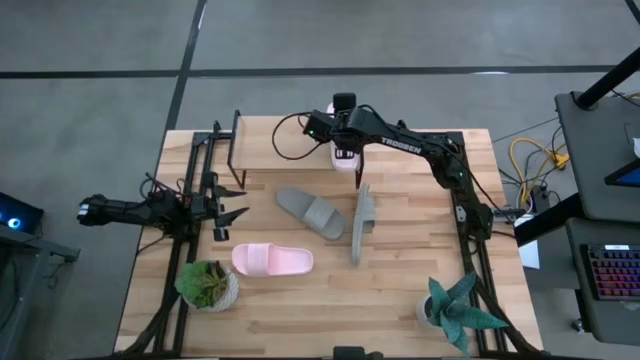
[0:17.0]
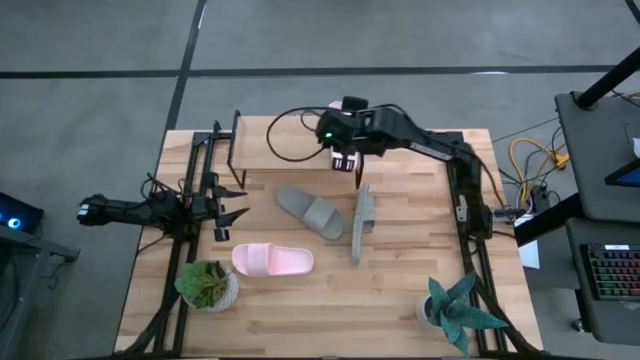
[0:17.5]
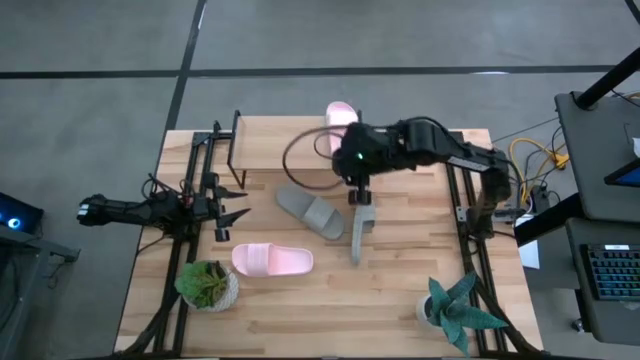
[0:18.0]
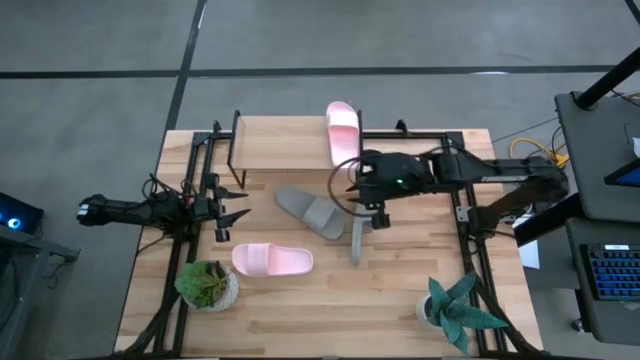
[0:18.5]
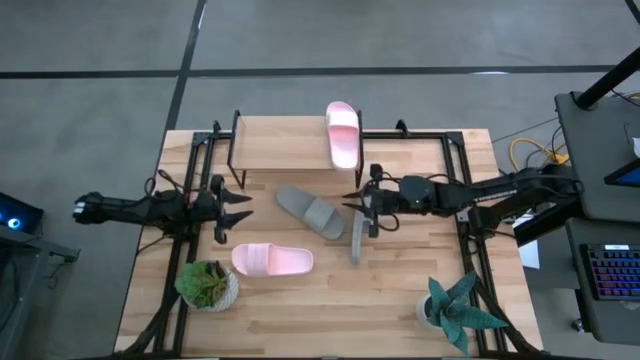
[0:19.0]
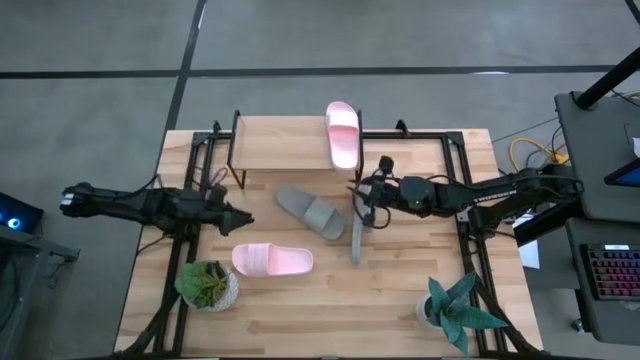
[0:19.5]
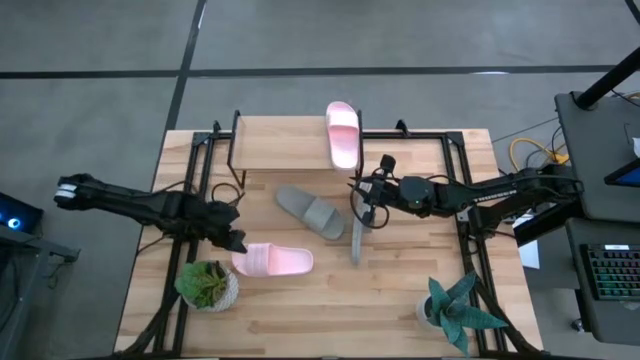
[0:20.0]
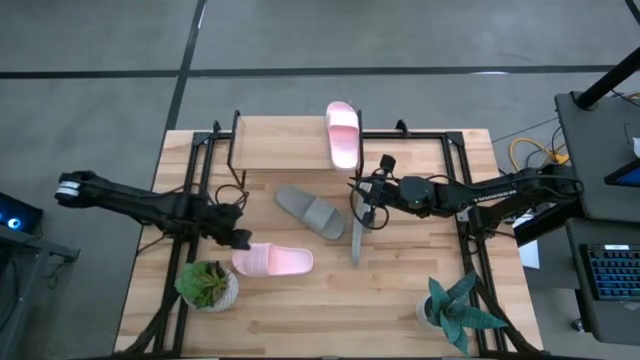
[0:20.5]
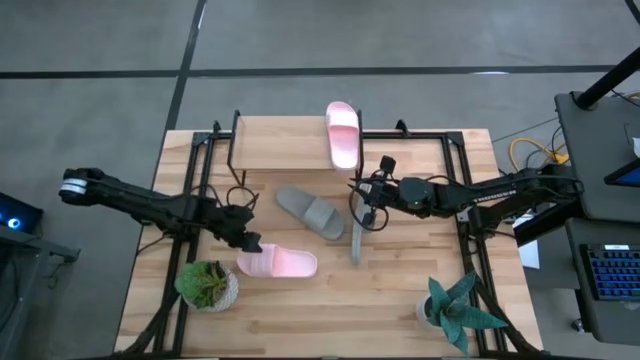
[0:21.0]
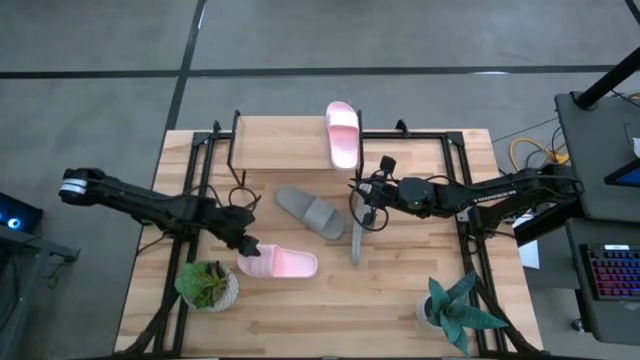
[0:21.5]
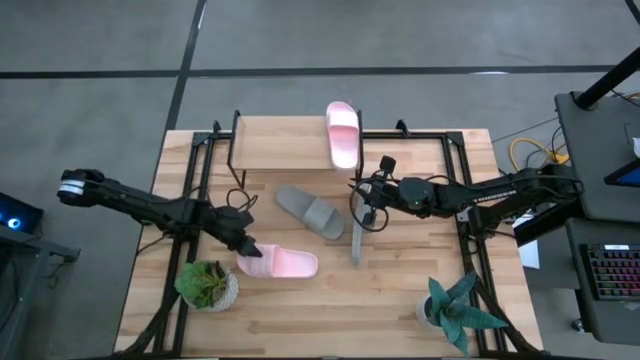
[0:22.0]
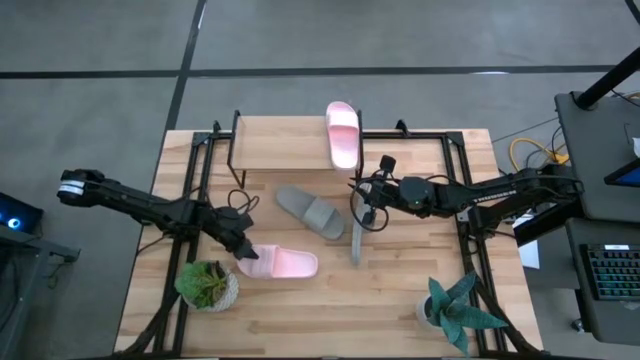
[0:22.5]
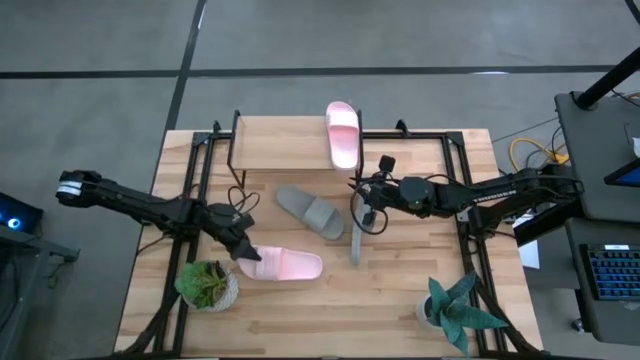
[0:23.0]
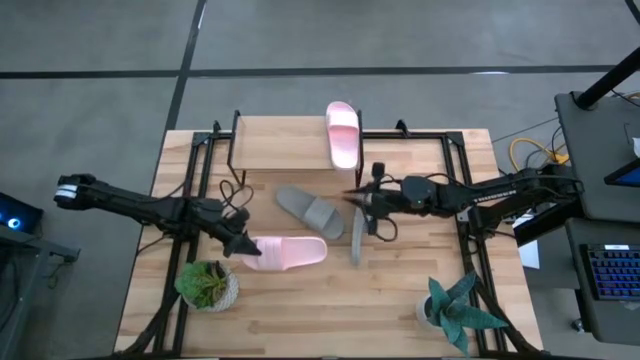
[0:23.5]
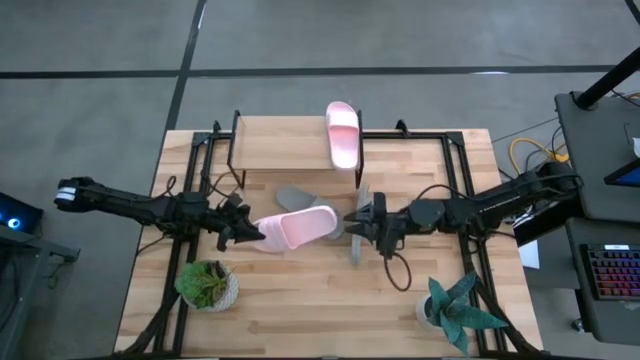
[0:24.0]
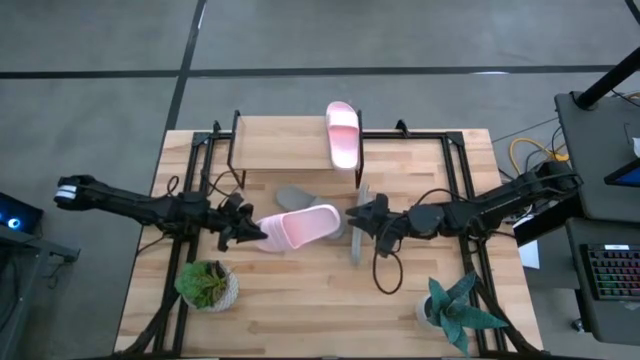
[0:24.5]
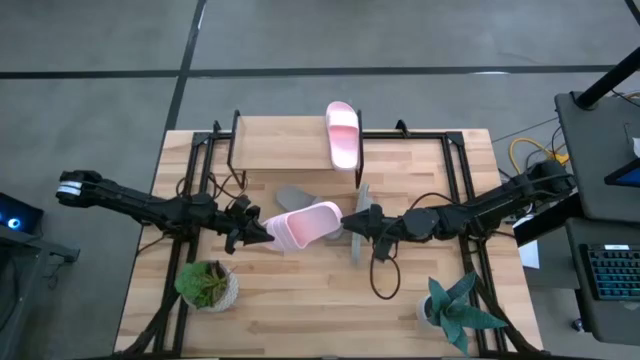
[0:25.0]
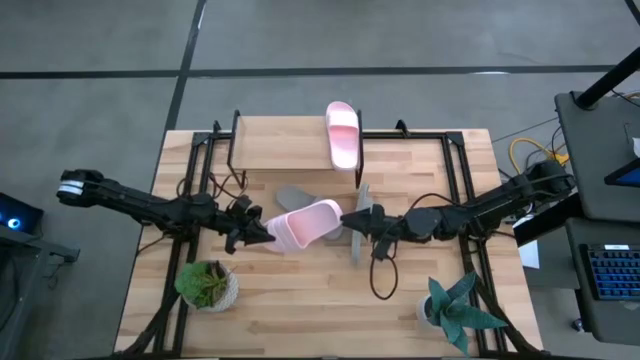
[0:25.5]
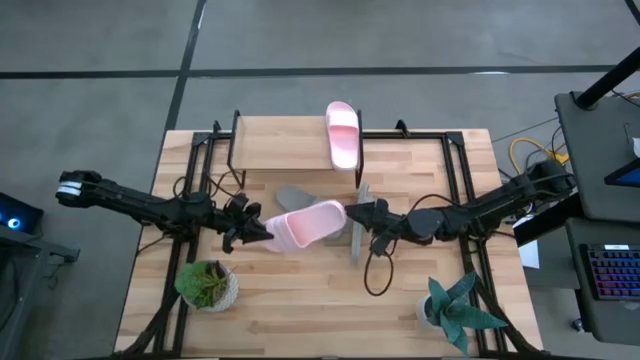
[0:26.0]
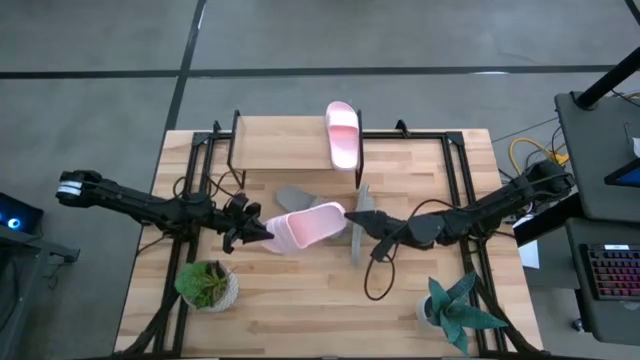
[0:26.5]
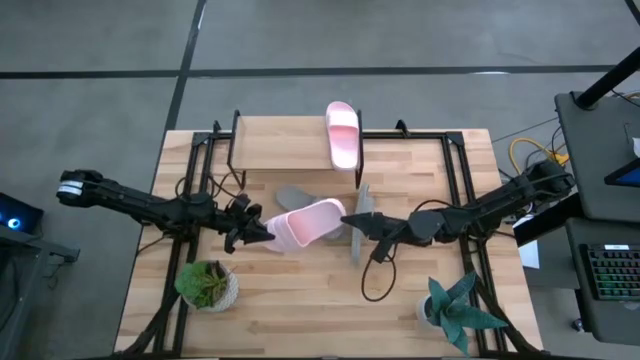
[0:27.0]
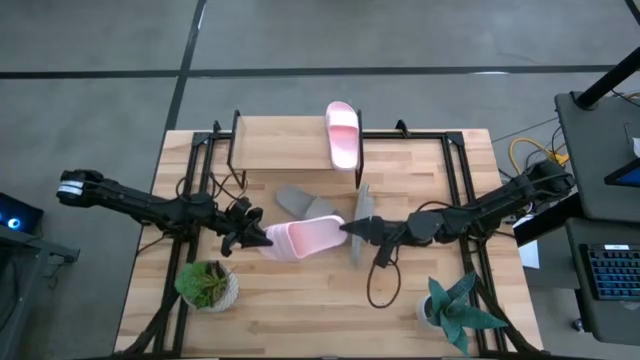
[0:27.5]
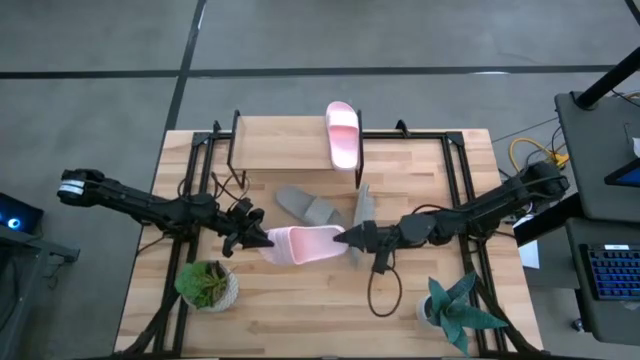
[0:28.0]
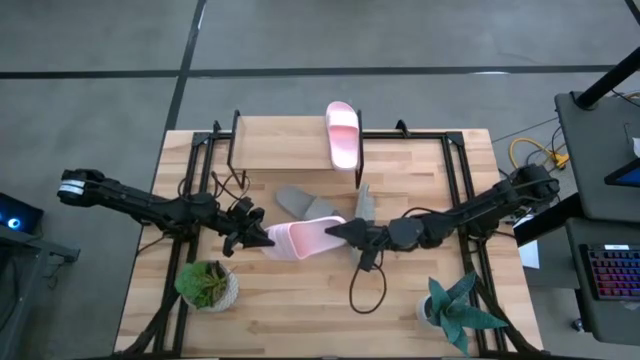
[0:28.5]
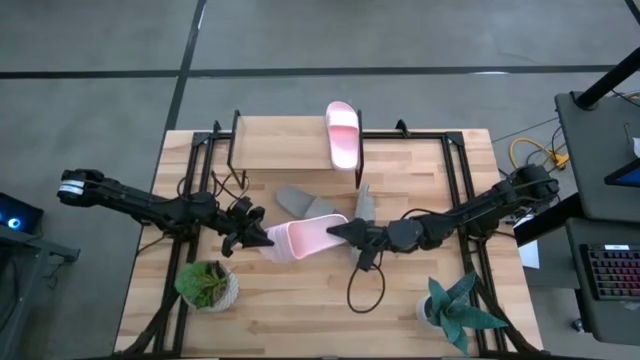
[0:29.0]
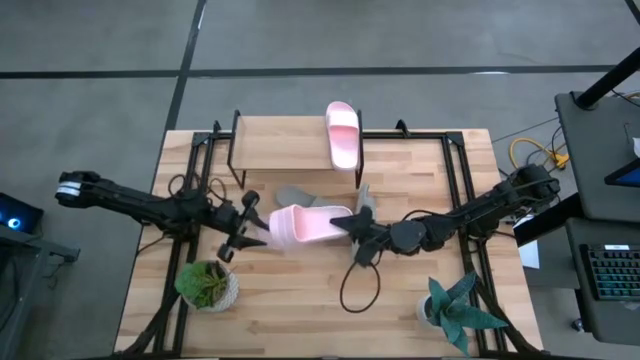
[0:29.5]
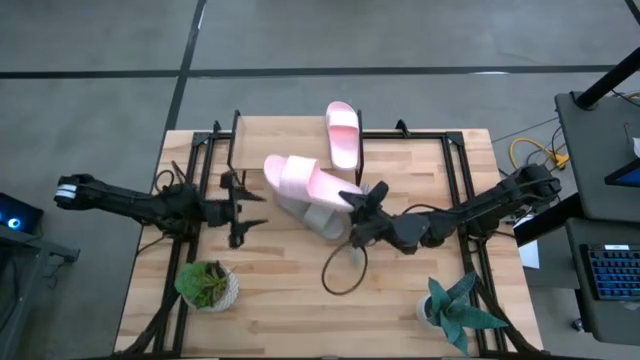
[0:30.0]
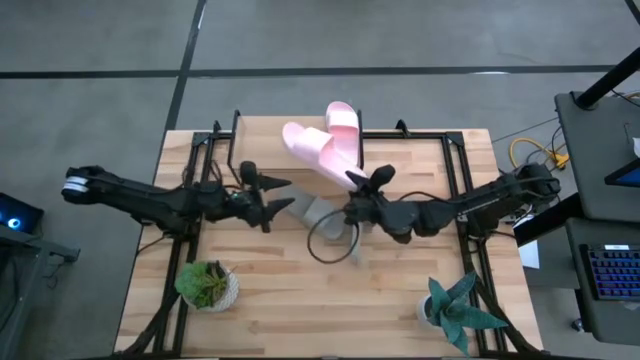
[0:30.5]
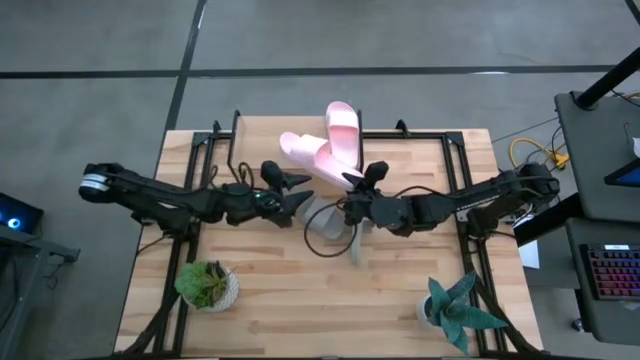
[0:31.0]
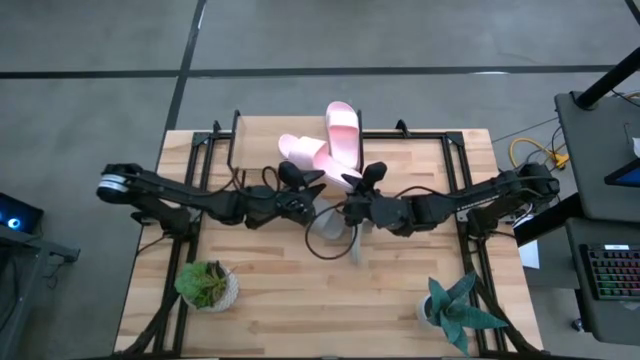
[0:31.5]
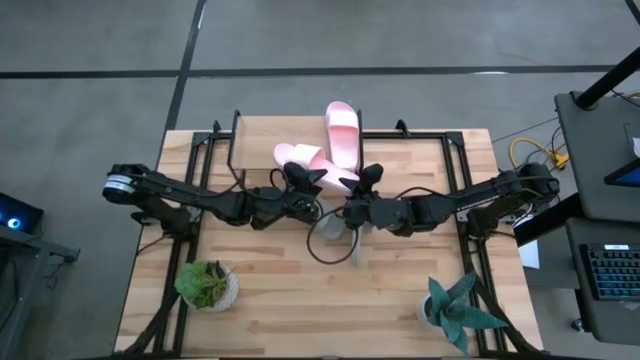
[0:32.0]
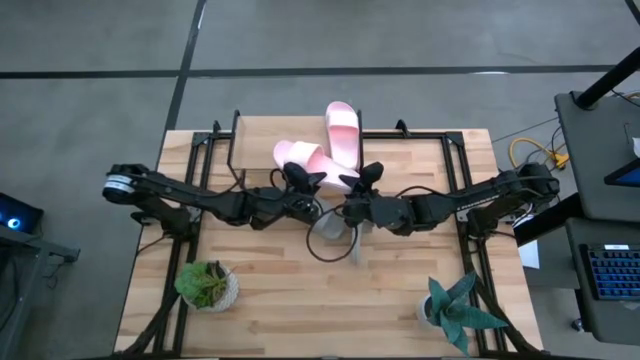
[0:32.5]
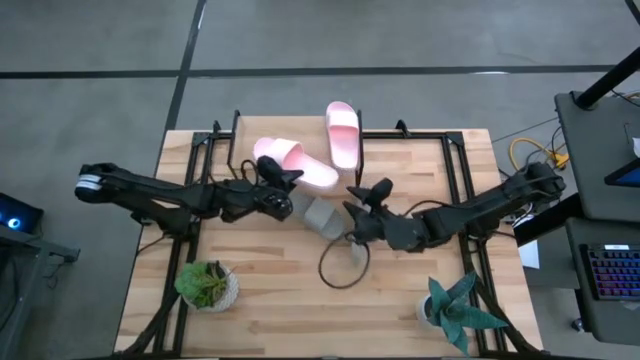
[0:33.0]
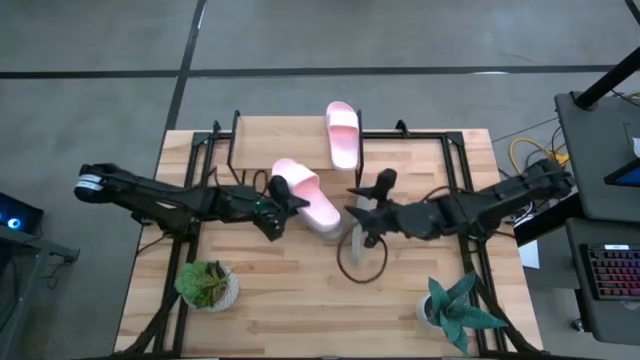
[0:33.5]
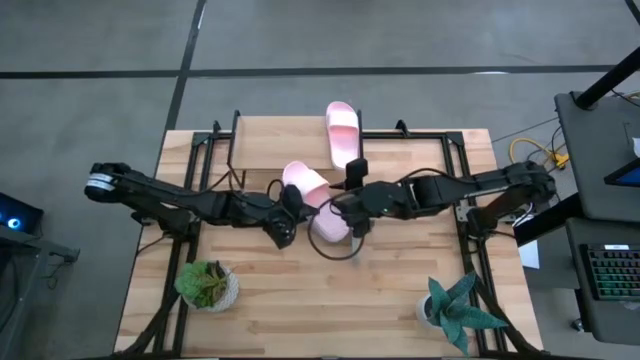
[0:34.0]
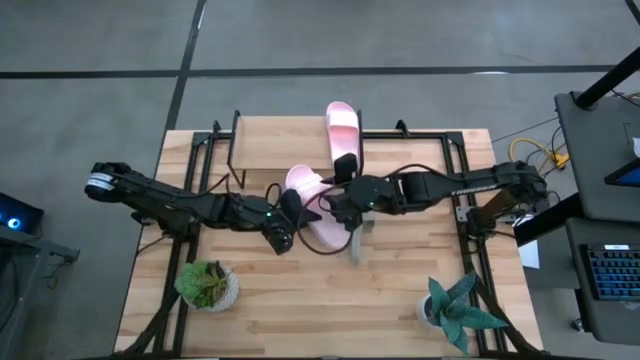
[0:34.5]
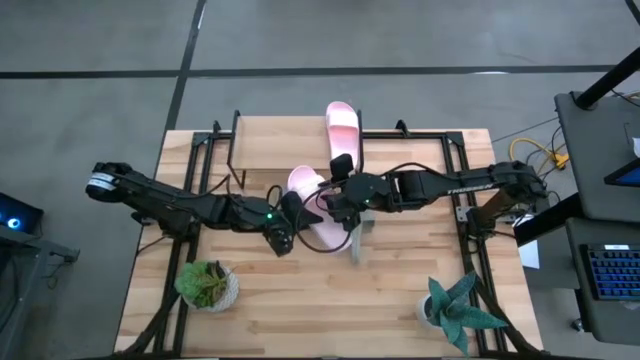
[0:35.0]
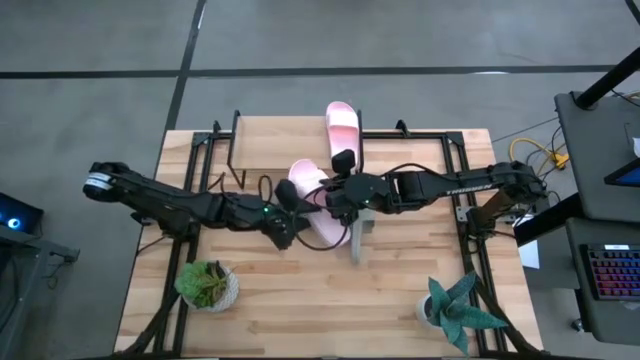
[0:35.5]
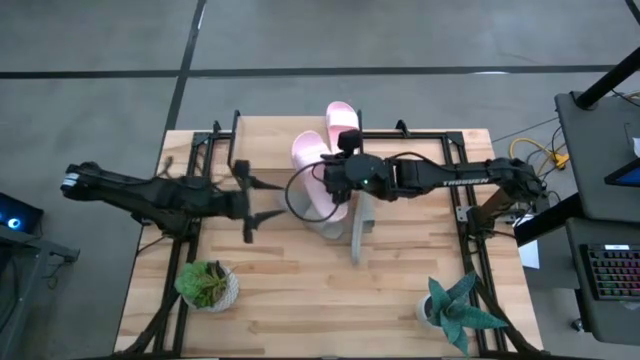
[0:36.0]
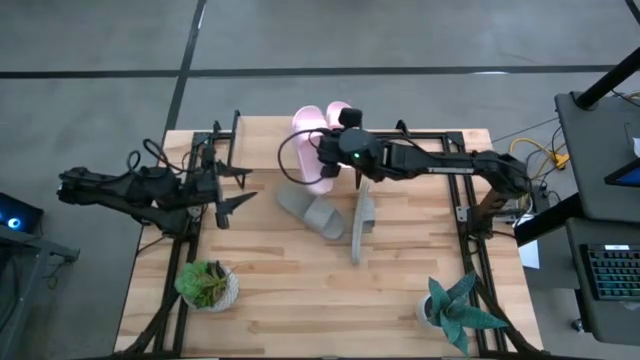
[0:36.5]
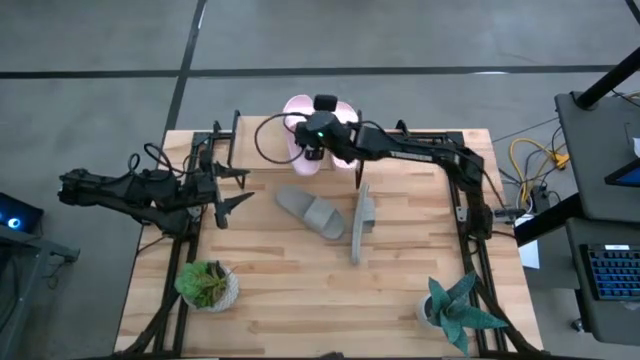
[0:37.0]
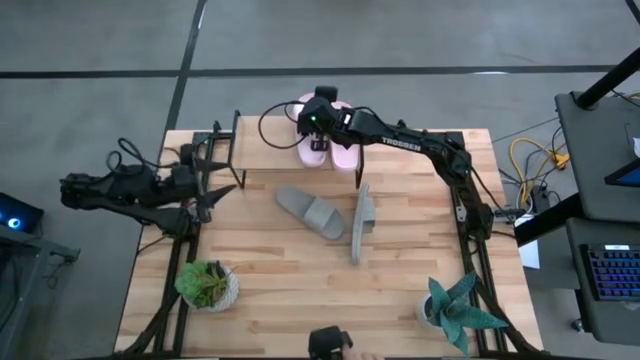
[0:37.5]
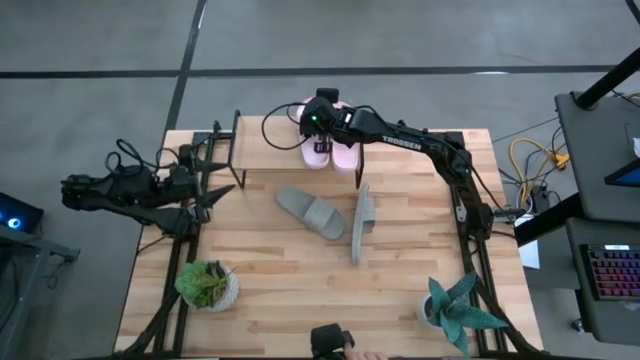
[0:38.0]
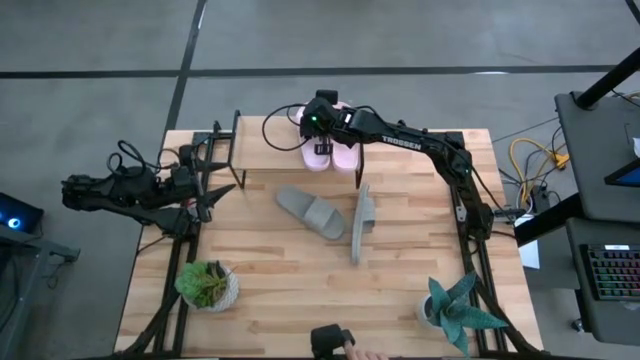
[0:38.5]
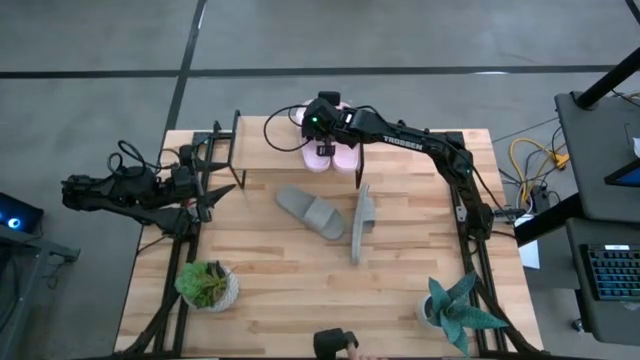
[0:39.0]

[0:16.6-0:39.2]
Task: Pick and place slides into the shelf
Put the pink slipper on the shelf
